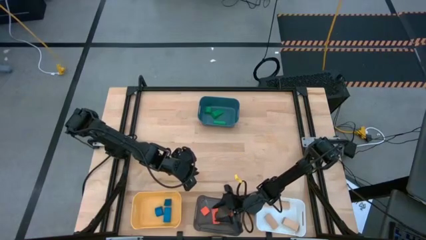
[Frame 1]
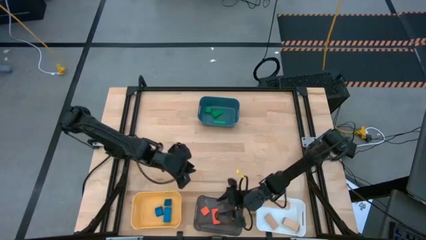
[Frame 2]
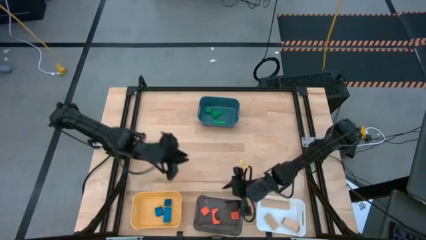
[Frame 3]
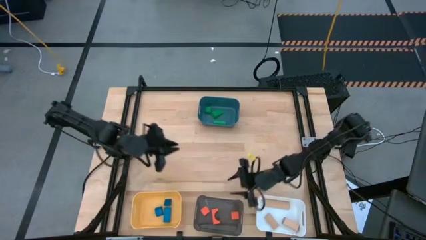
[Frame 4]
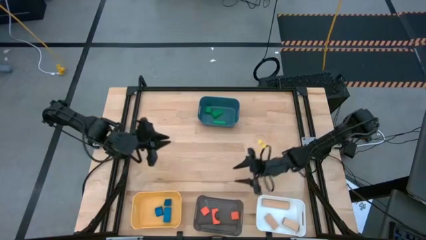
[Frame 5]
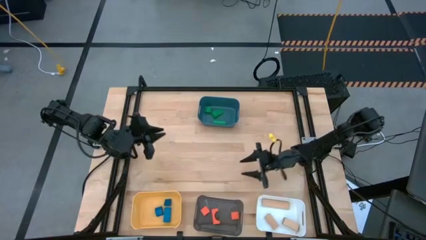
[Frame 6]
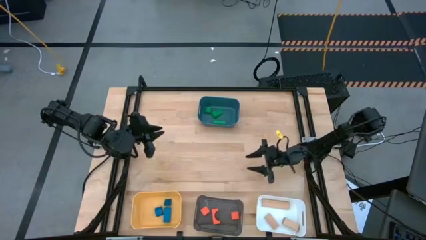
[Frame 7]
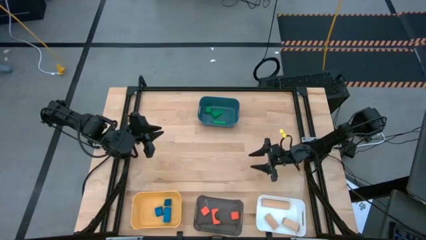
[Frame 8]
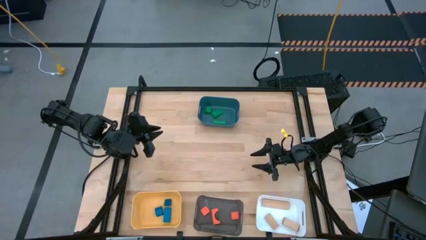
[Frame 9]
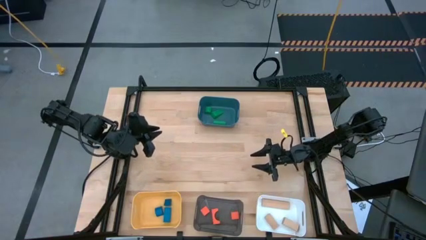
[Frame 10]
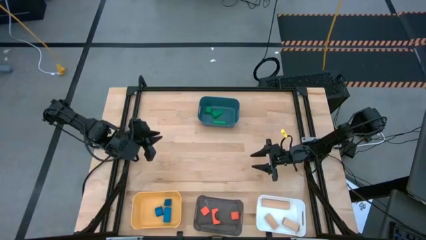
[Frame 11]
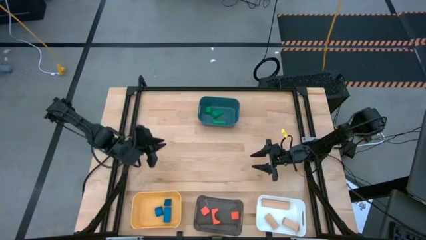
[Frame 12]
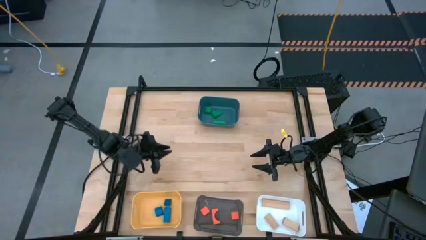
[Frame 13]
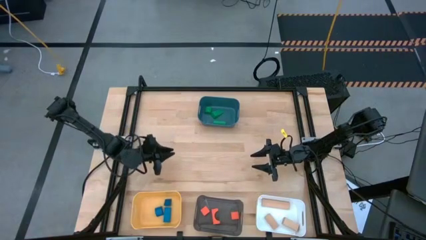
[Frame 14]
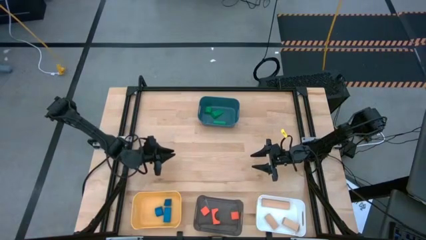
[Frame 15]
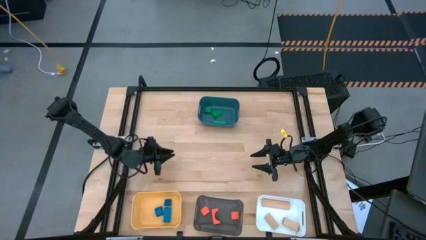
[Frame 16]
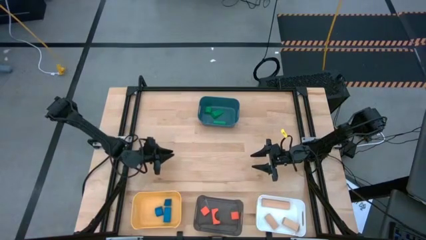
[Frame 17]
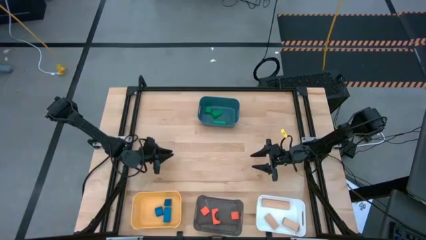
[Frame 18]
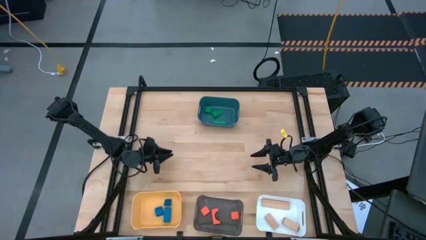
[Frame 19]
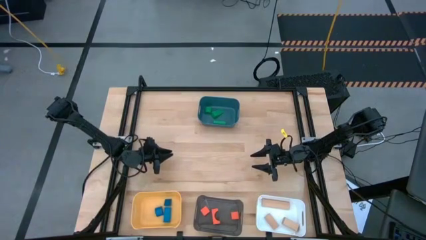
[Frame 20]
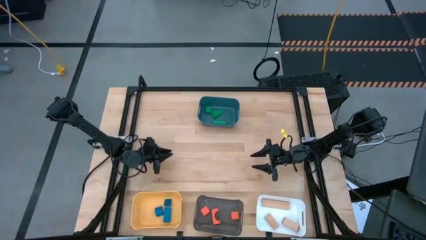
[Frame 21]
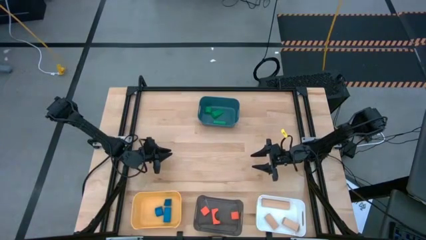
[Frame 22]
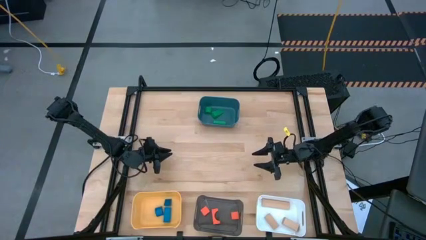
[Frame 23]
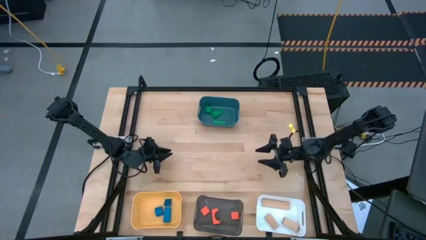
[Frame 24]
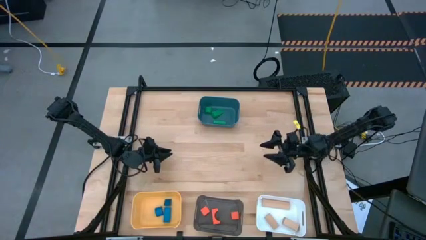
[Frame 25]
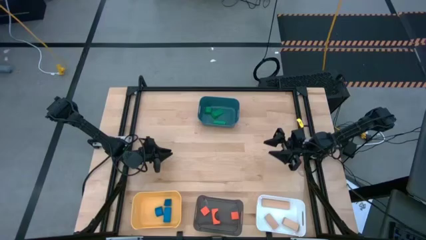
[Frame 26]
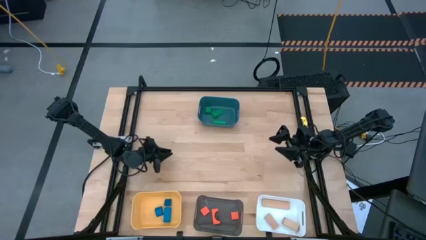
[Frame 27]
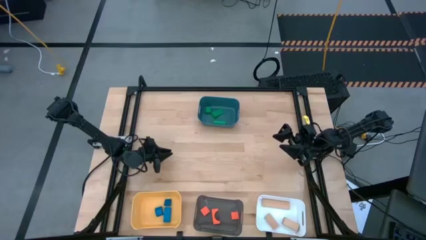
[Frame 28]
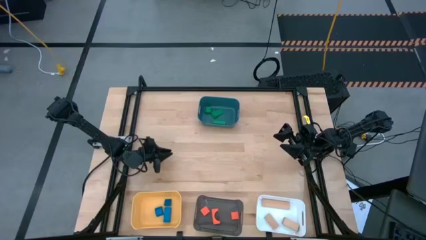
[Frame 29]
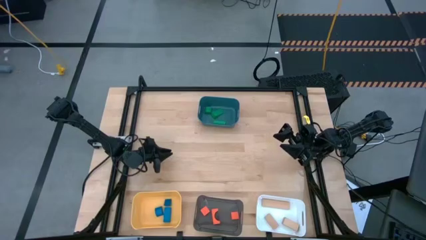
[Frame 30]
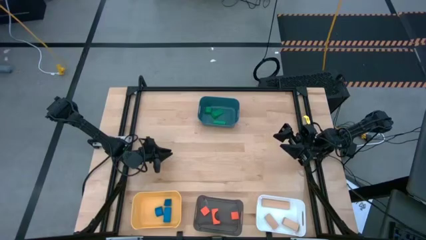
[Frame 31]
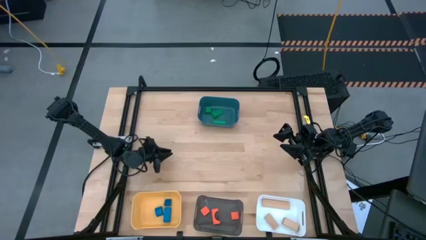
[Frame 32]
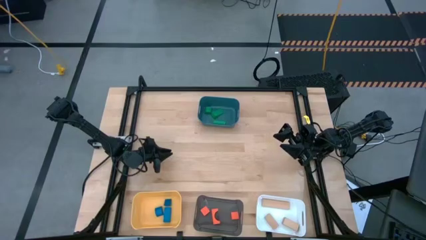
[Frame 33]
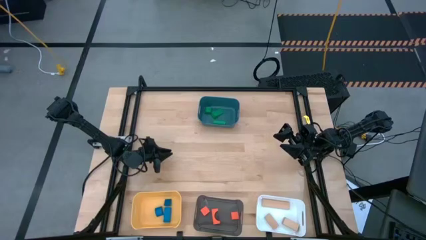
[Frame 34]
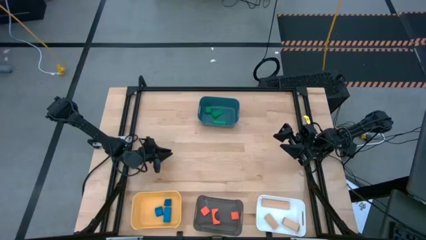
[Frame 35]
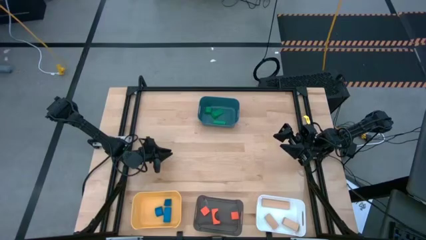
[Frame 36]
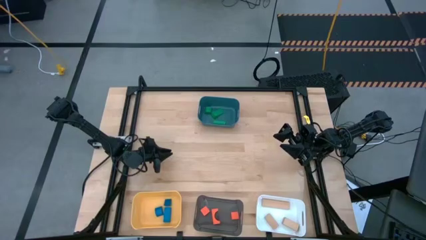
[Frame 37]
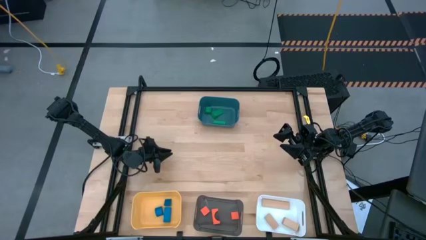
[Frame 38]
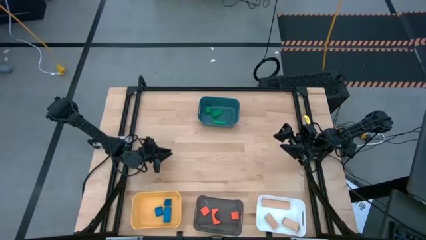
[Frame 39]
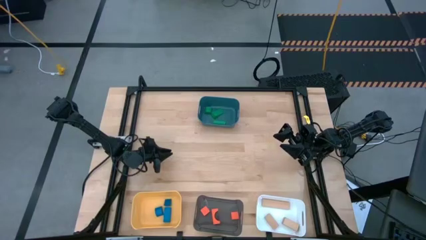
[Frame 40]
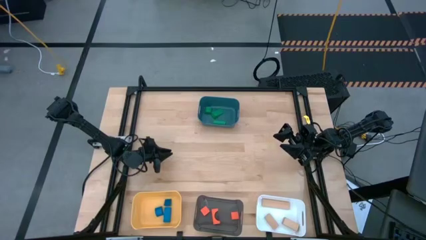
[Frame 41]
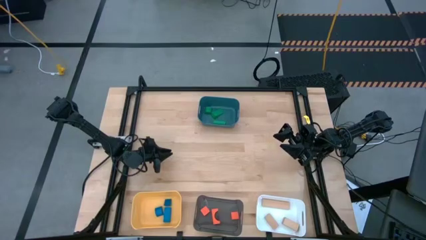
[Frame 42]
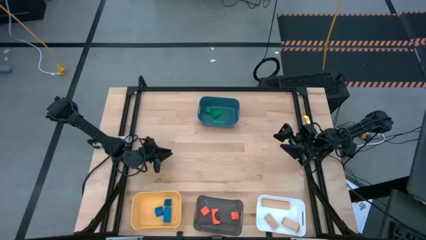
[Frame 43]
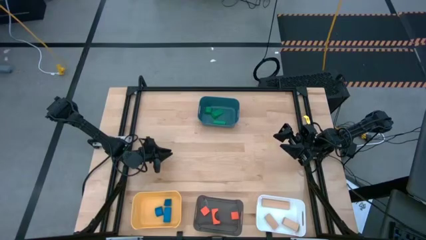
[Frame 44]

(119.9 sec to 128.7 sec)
Task: Sort & place blocks by color
Return to Home Position

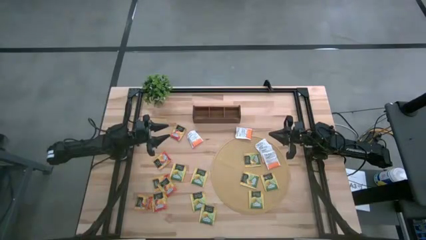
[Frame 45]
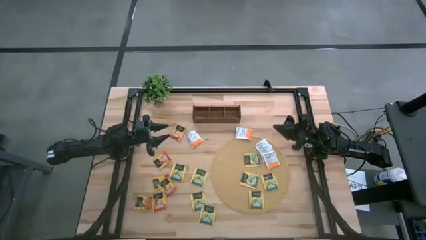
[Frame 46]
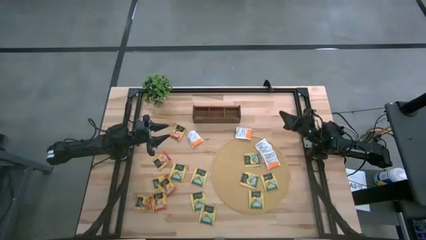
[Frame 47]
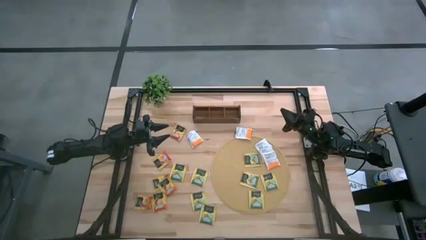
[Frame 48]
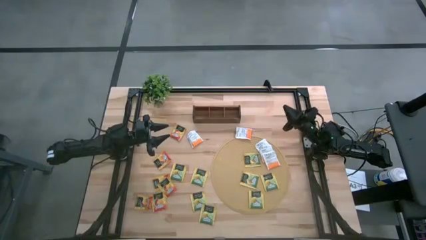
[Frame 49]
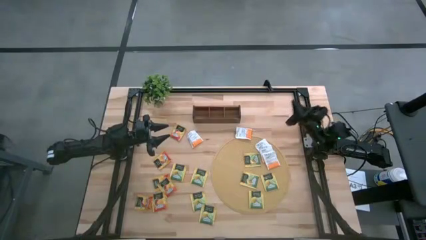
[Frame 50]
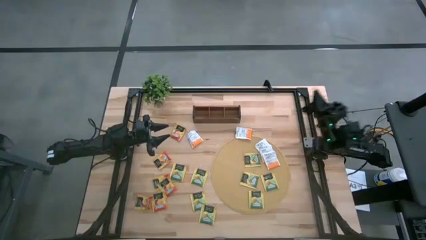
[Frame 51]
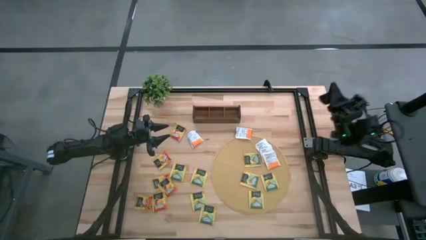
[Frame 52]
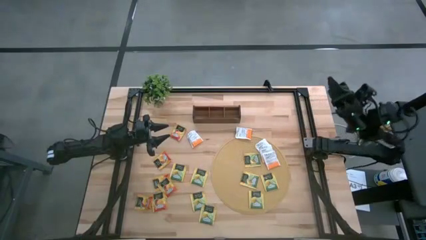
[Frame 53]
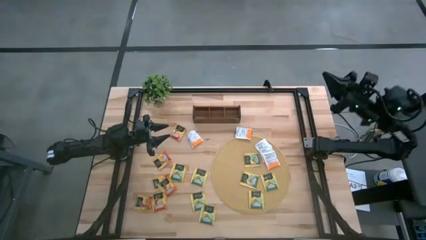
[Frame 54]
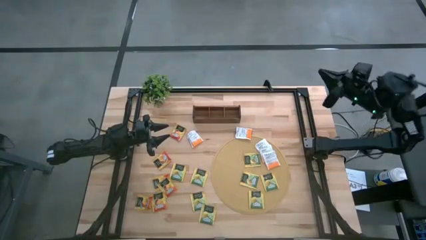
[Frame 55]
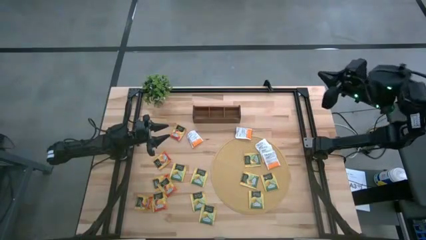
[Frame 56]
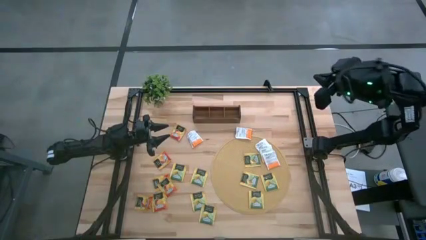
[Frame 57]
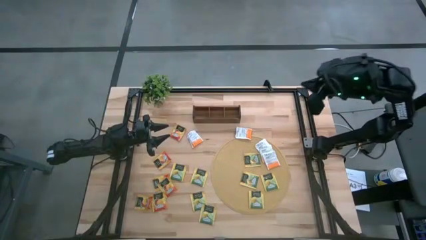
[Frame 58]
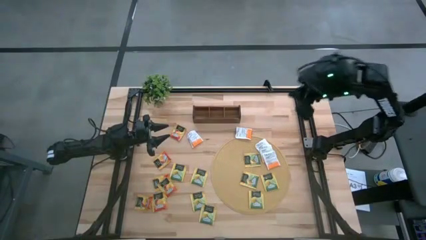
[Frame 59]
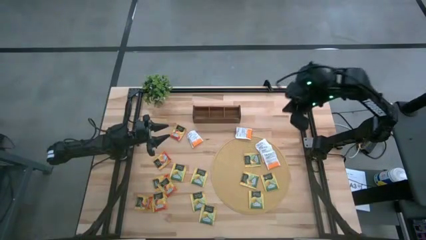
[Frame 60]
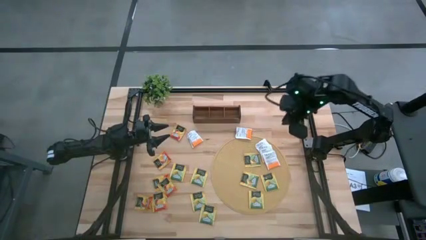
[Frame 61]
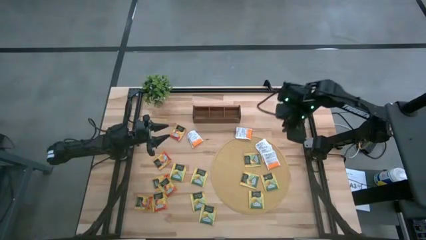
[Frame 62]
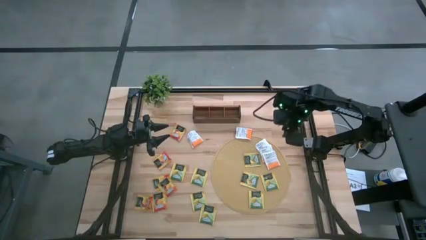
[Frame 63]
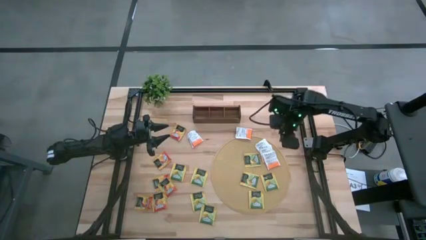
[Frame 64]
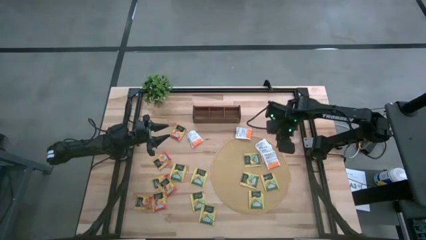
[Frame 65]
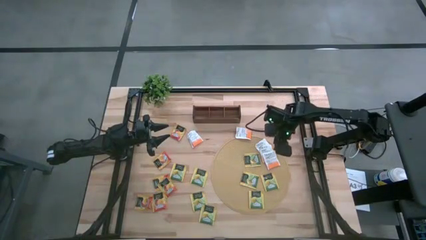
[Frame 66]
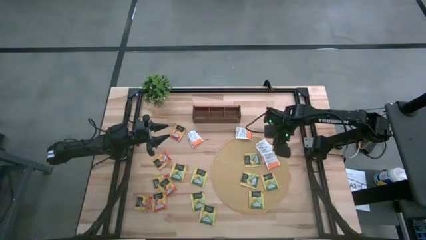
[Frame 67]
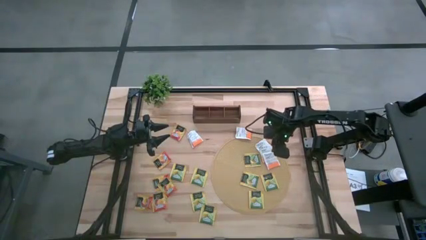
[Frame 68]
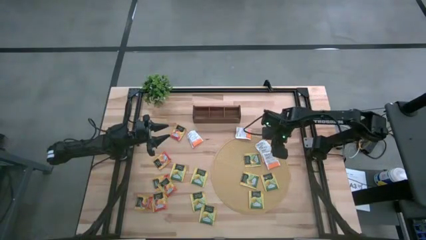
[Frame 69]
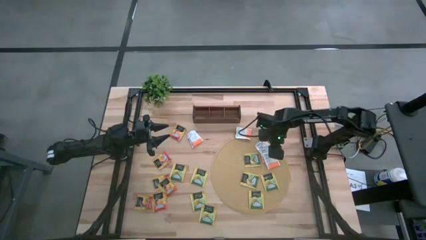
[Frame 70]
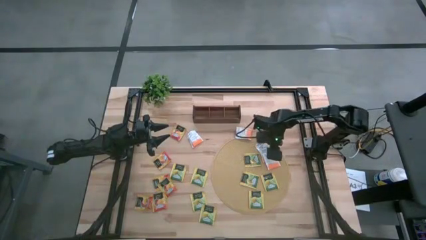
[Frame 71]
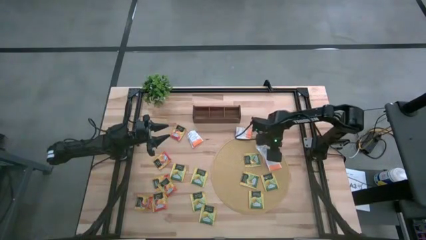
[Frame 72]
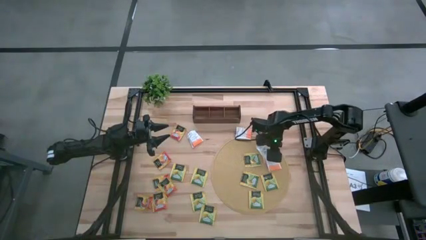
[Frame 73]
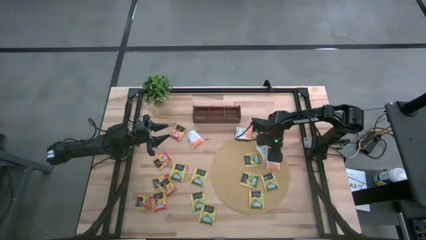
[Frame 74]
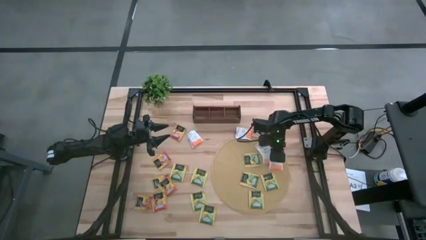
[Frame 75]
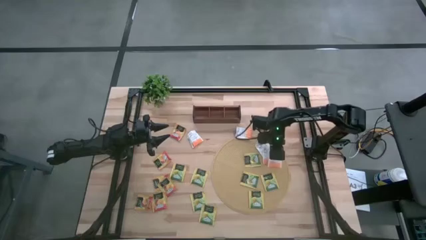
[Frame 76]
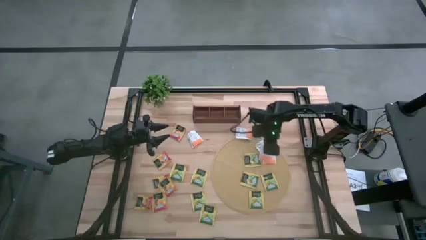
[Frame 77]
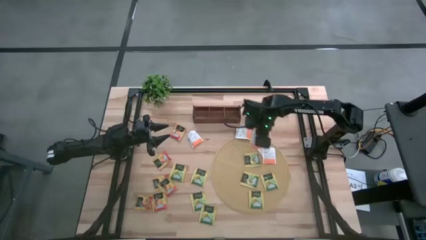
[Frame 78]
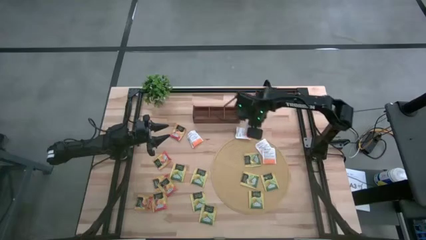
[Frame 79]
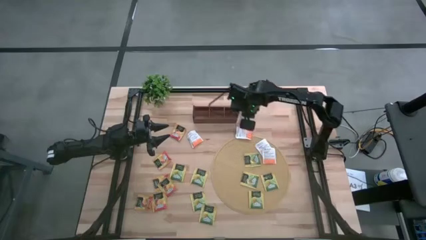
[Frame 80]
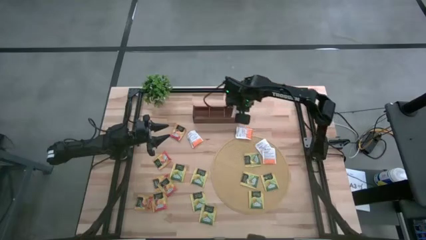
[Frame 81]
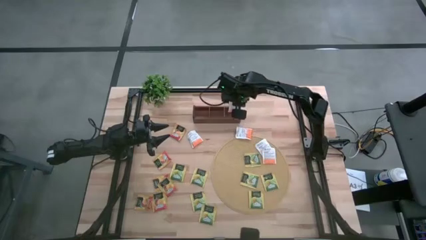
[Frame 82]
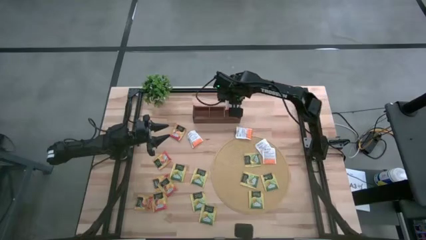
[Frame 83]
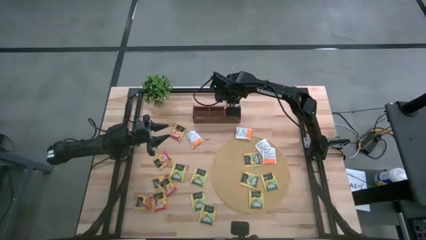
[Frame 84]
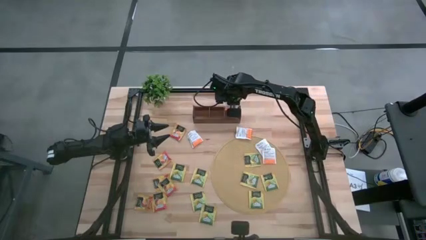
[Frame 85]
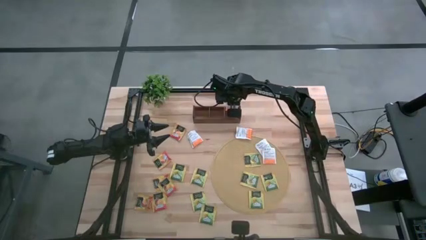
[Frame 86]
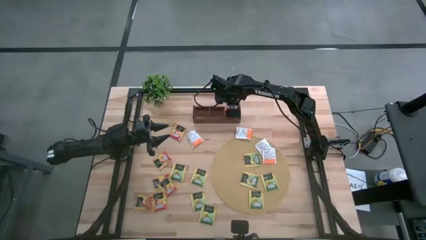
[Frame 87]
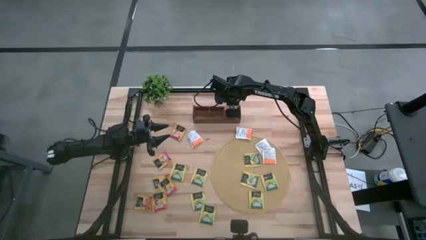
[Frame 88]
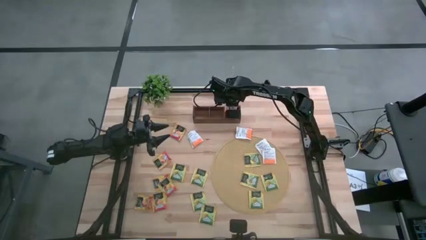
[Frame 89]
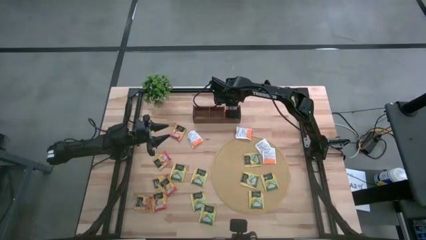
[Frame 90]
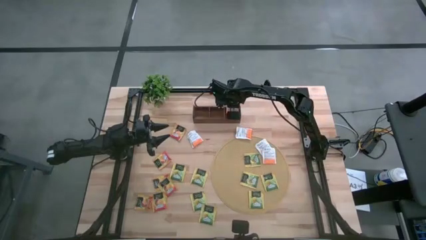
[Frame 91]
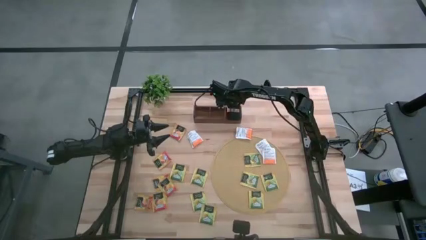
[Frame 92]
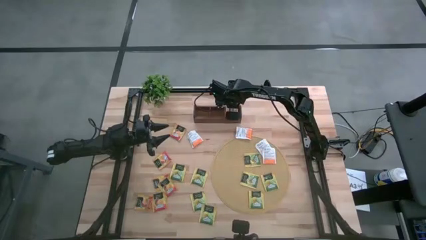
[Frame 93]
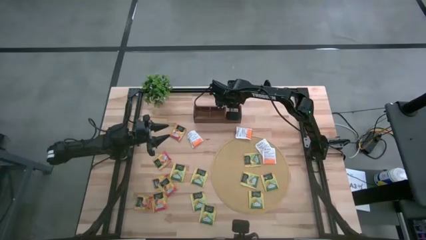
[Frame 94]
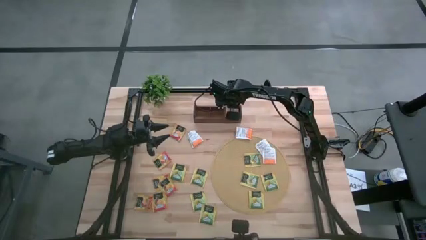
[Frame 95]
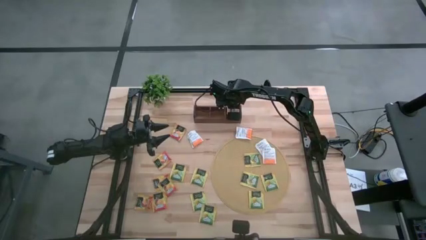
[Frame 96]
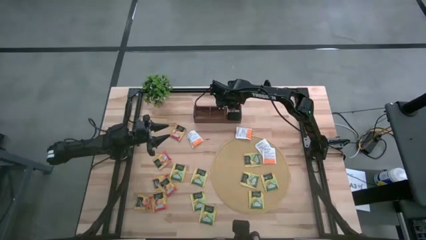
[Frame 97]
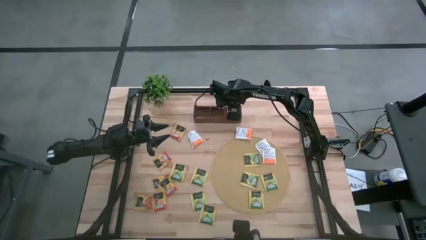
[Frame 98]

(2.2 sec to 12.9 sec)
Task: Pick & Place Tea
Put the white tea bag into the right section of the wooden organizer
